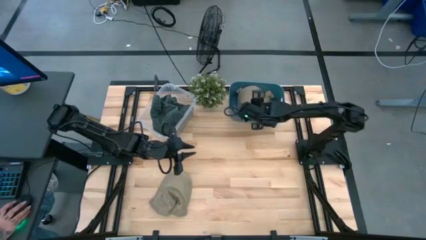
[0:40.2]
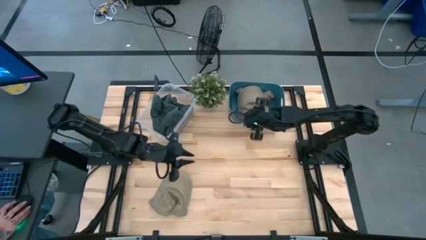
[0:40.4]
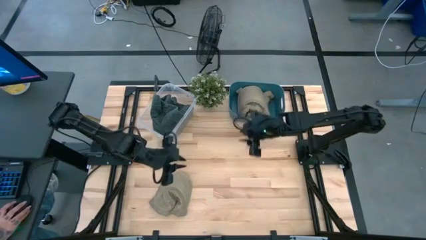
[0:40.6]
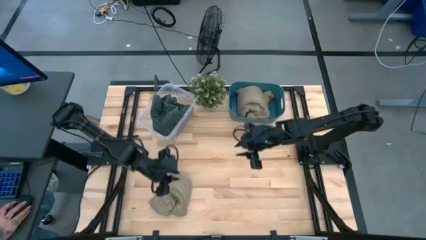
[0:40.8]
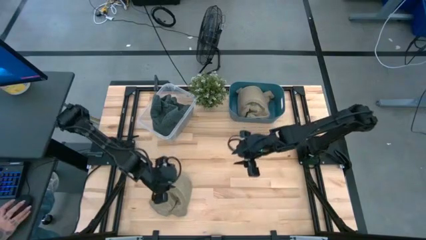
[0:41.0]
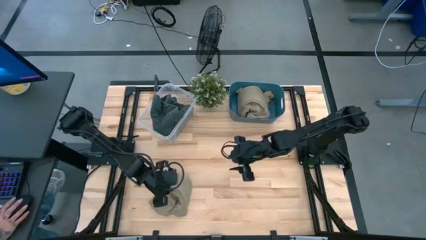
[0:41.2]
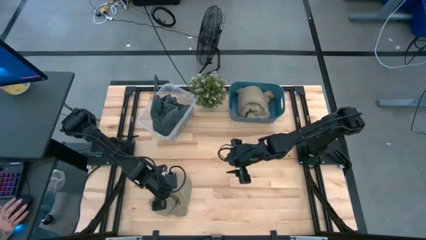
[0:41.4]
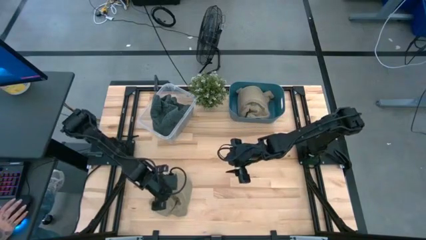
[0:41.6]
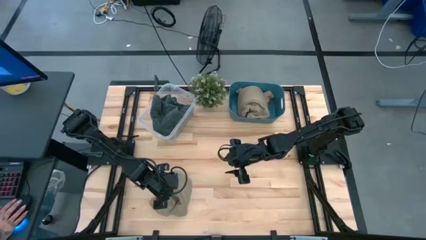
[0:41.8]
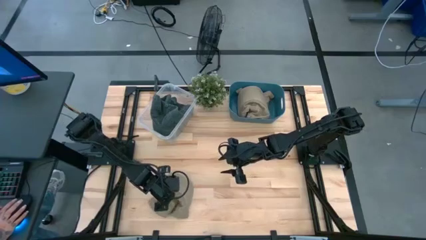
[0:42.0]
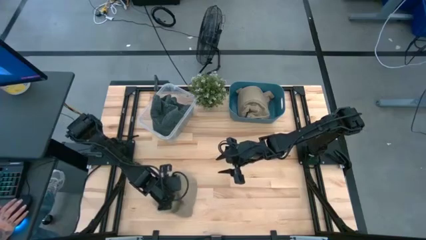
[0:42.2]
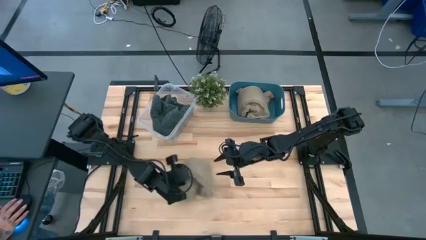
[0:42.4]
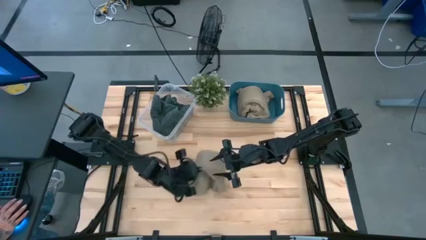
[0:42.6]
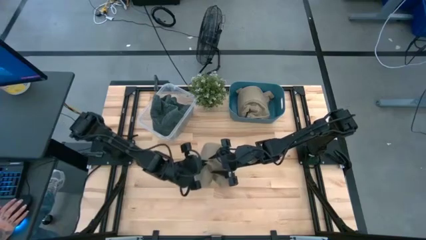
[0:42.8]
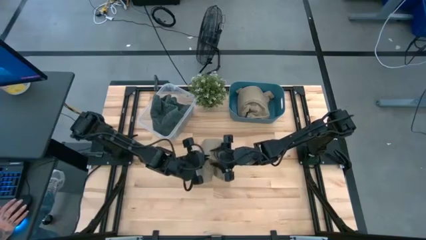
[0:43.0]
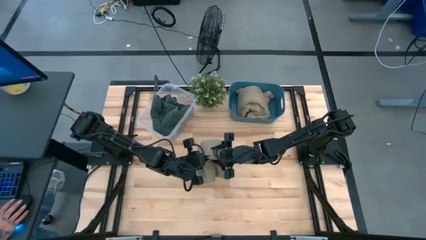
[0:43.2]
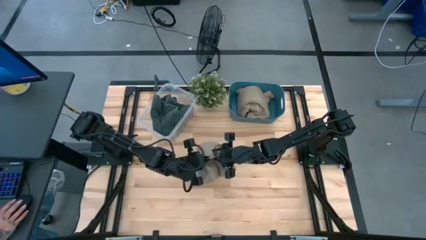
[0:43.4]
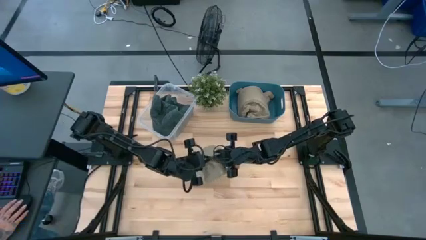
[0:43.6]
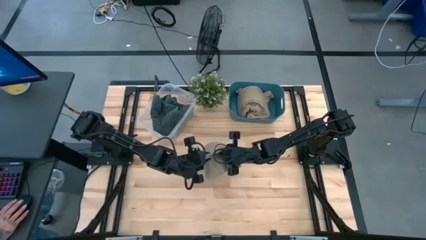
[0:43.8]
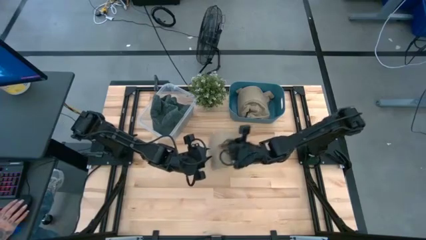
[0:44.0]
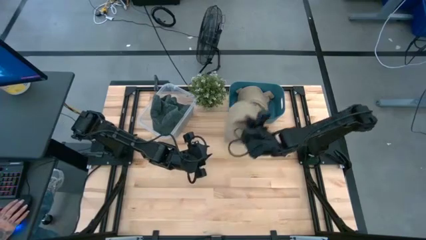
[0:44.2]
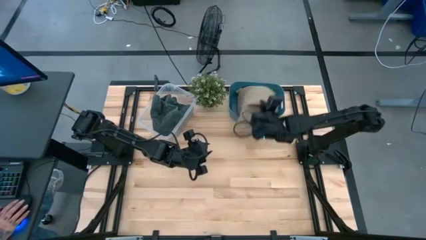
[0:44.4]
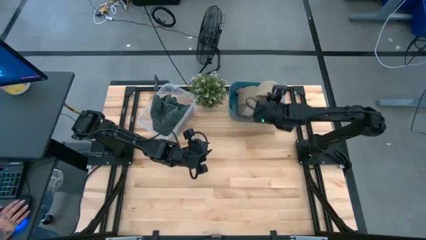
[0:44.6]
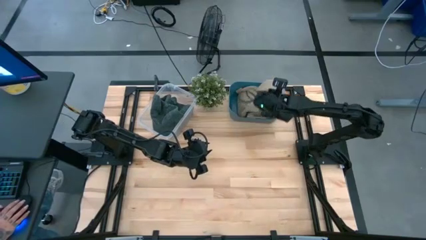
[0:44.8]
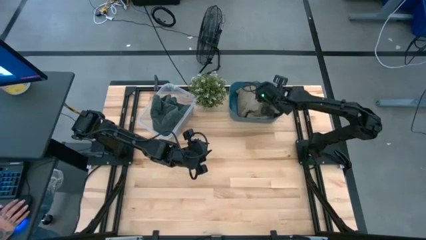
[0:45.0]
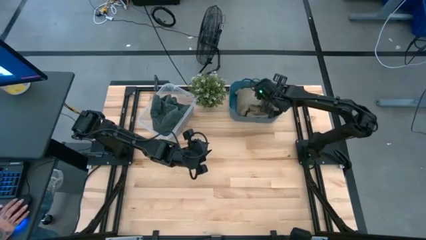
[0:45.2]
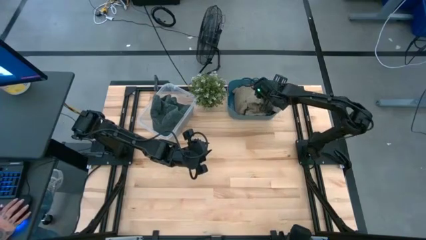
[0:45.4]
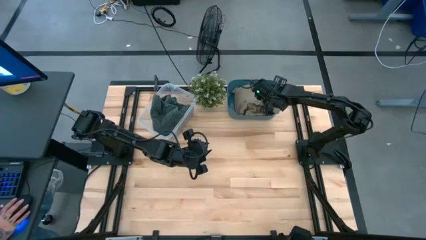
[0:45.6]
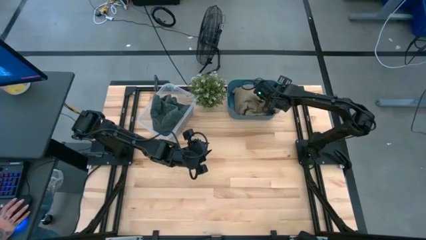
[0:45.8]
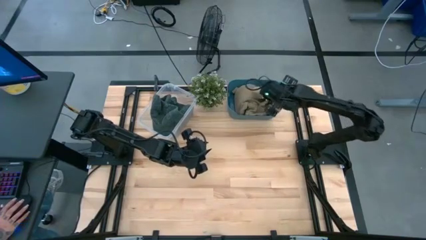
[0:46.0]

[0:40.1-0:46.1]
Task: Pick & Place hat
Put the brown cap into the blue bin

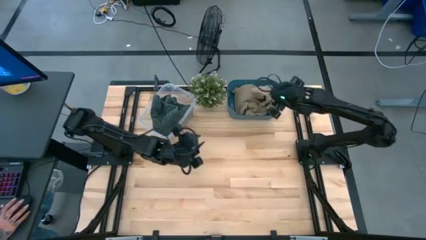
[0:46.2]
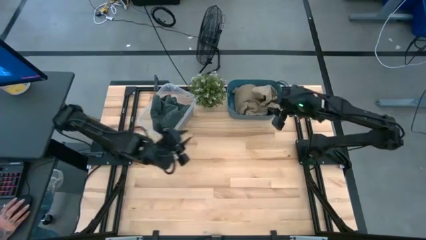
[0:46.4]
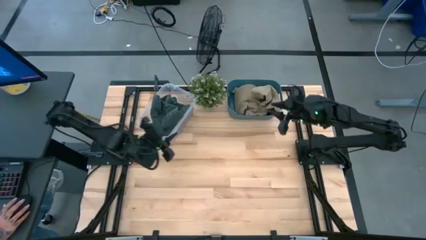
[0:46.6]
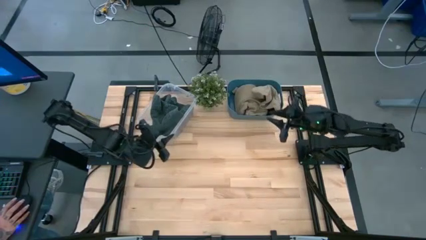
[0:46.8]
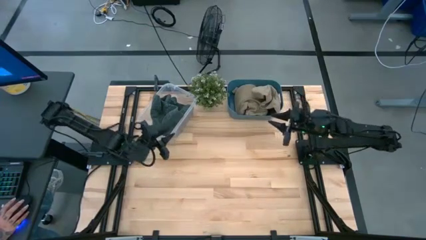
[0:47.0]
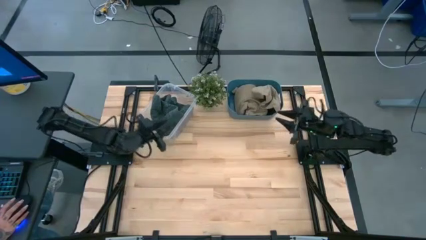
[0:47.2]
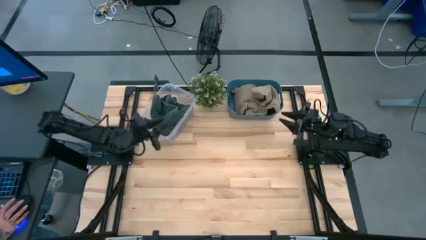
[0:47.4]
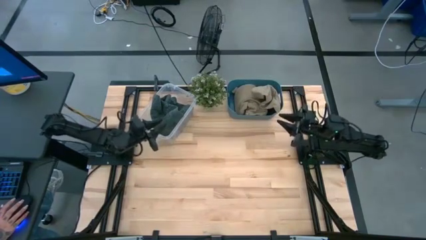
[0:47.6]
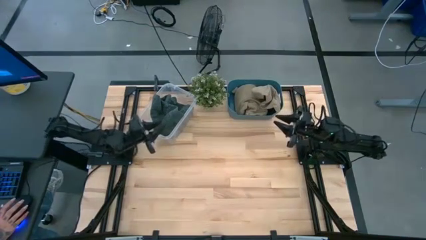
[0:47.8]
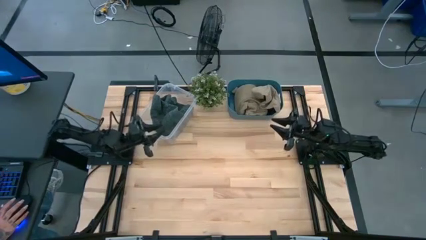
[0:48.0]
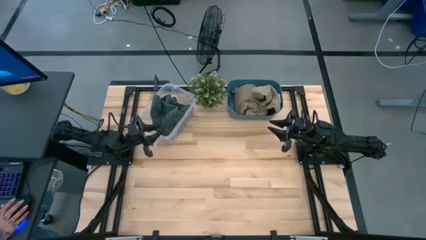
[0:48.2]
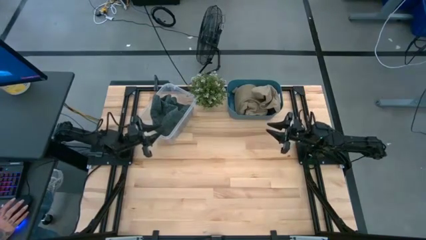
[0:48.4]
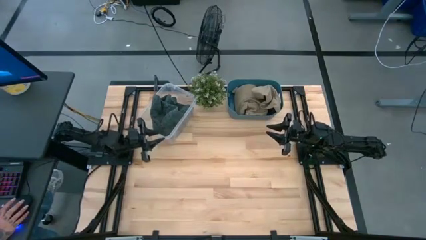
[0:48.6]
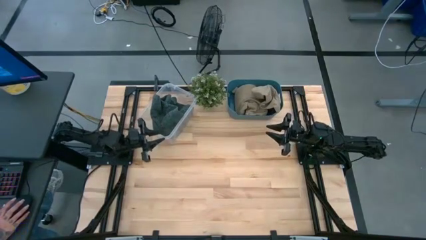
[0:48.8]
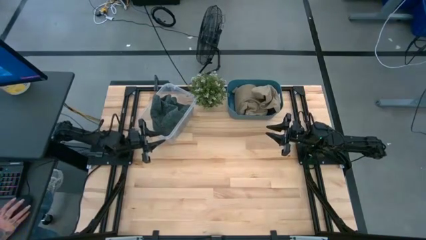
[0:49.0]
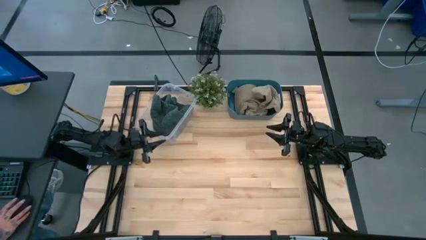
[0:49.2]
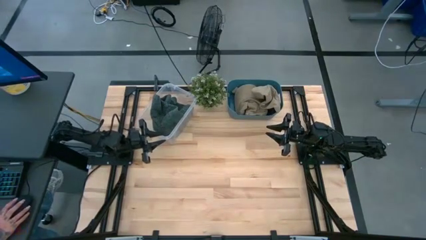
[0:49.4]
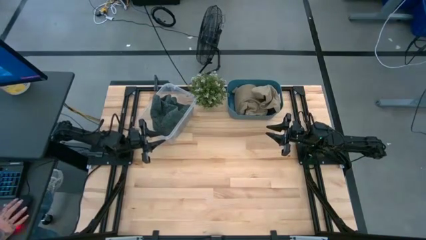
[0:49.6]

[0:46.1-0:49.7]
Return to Home Position

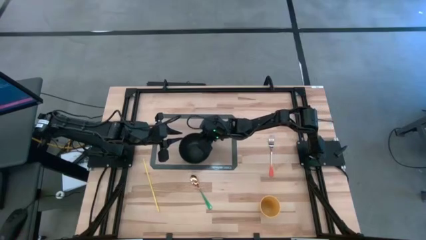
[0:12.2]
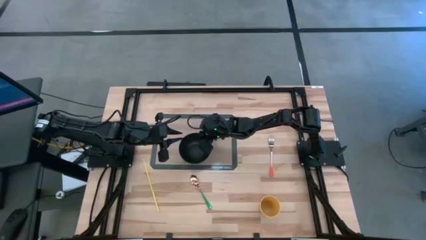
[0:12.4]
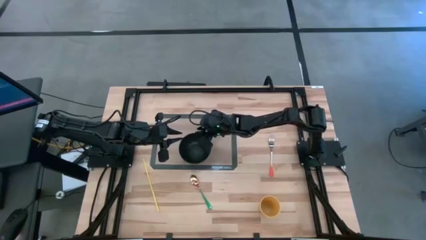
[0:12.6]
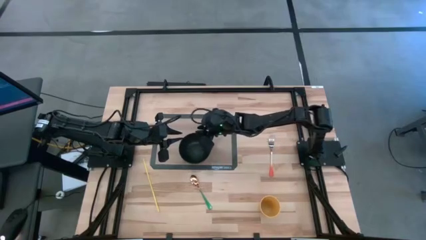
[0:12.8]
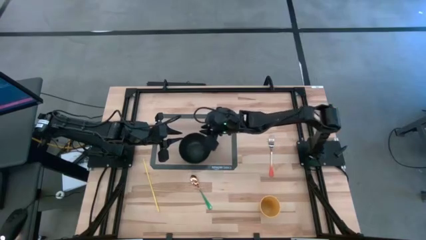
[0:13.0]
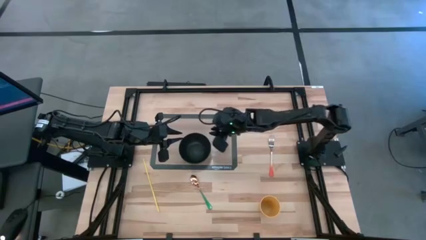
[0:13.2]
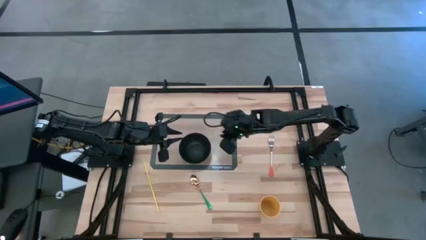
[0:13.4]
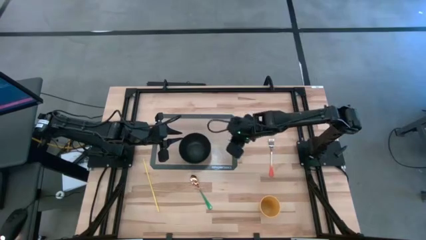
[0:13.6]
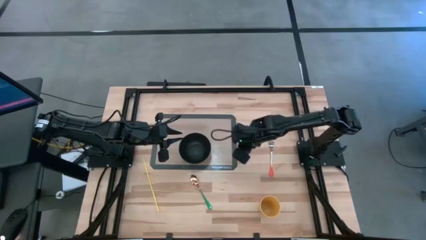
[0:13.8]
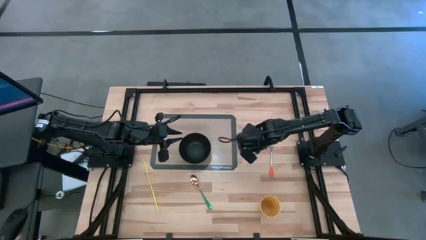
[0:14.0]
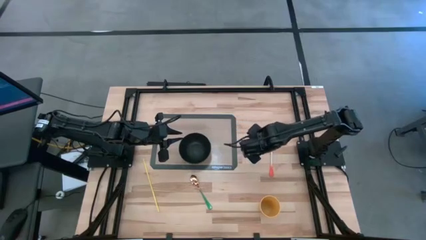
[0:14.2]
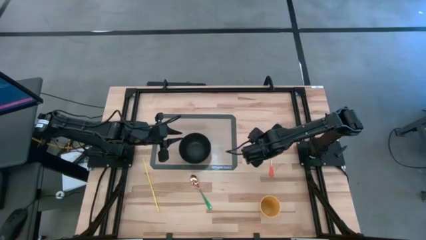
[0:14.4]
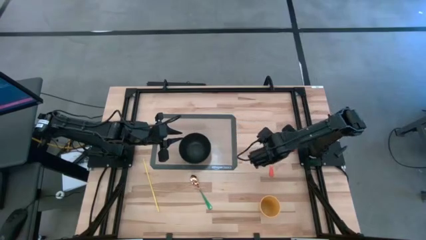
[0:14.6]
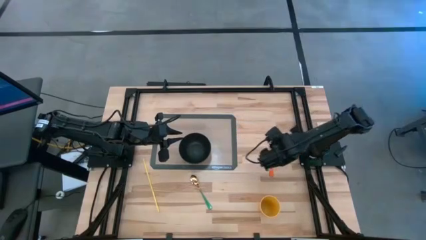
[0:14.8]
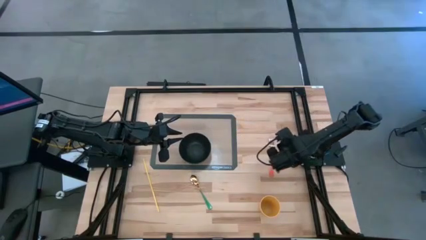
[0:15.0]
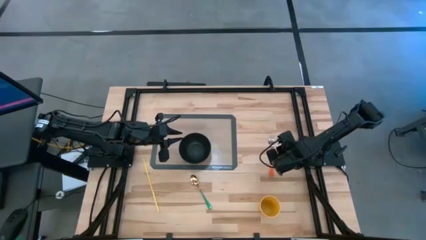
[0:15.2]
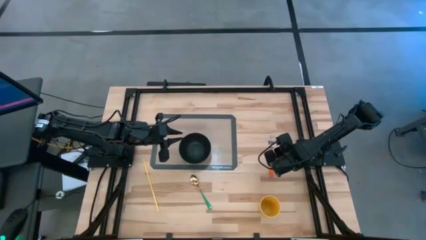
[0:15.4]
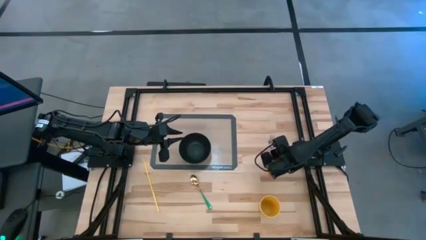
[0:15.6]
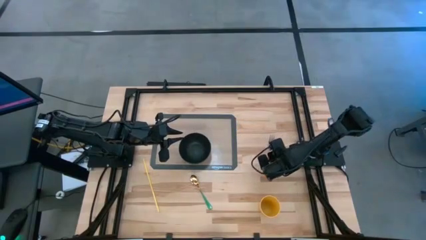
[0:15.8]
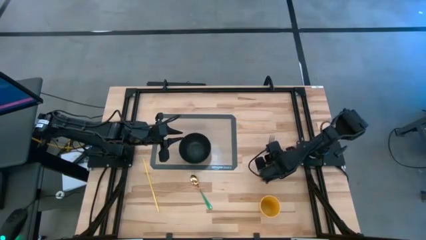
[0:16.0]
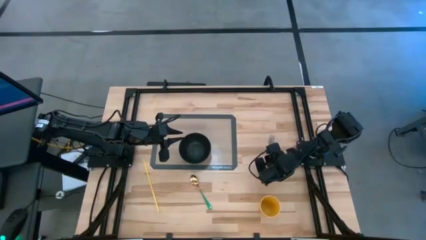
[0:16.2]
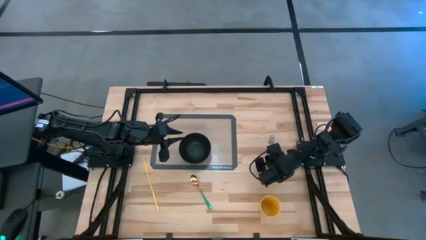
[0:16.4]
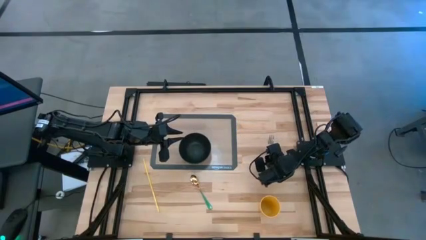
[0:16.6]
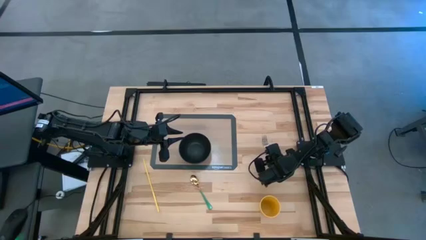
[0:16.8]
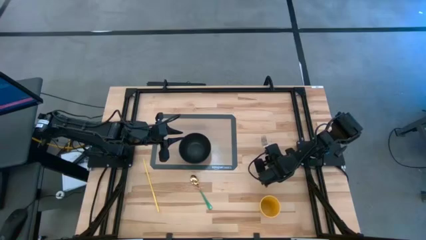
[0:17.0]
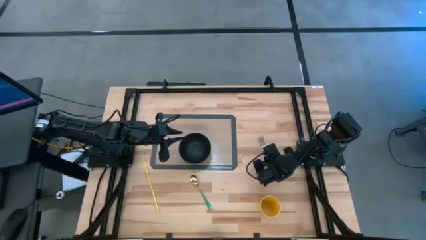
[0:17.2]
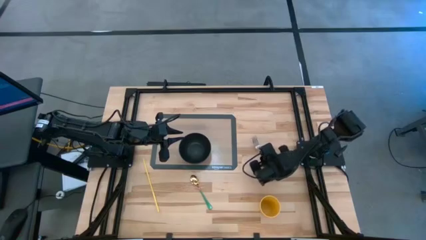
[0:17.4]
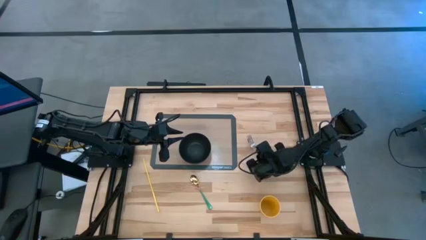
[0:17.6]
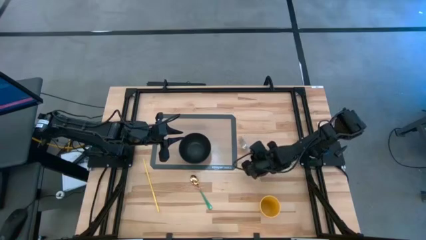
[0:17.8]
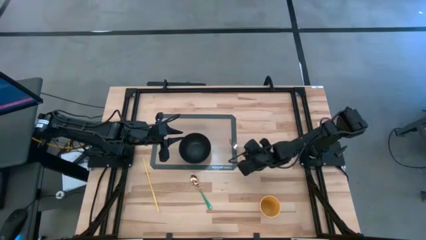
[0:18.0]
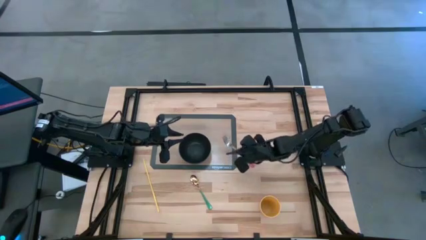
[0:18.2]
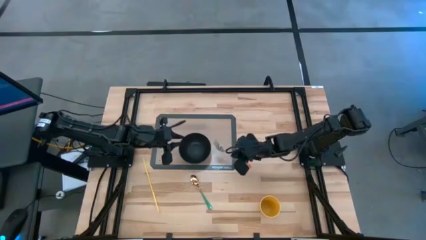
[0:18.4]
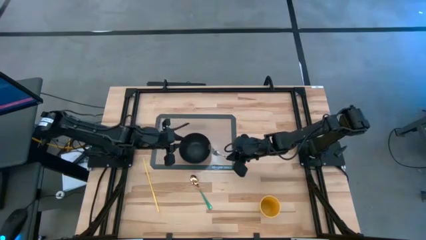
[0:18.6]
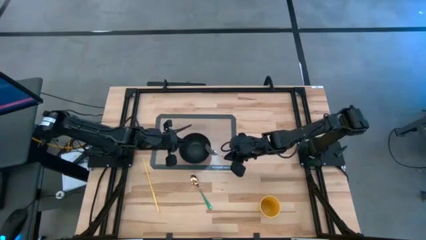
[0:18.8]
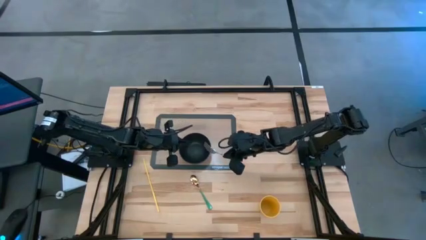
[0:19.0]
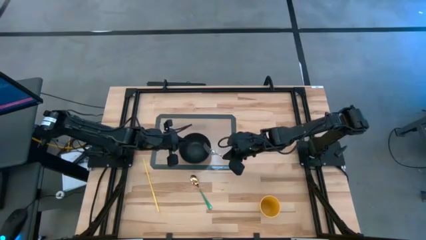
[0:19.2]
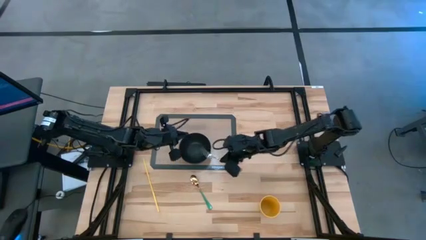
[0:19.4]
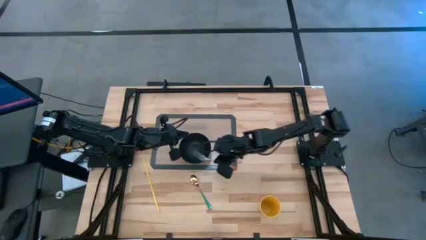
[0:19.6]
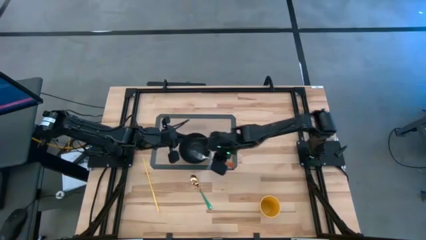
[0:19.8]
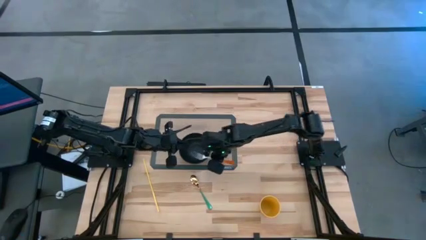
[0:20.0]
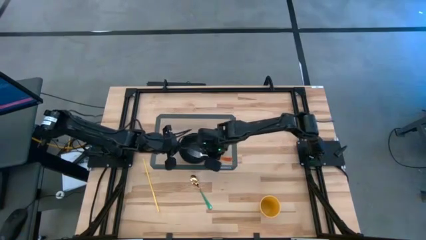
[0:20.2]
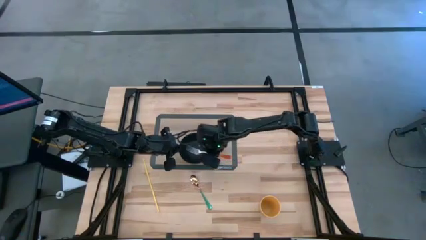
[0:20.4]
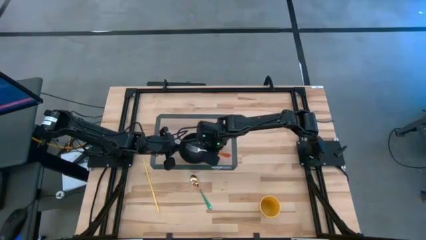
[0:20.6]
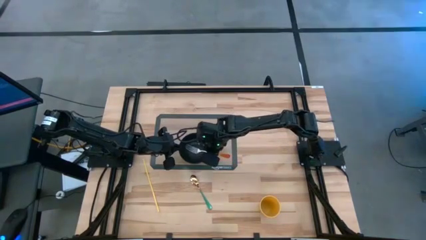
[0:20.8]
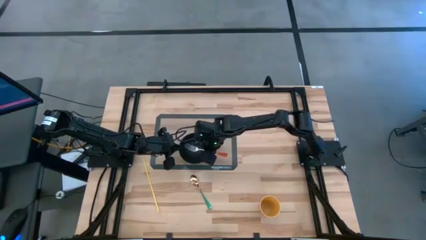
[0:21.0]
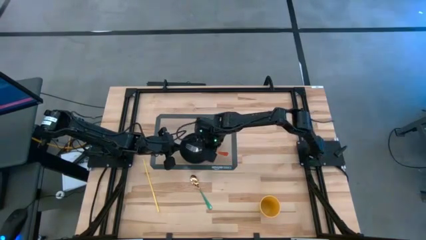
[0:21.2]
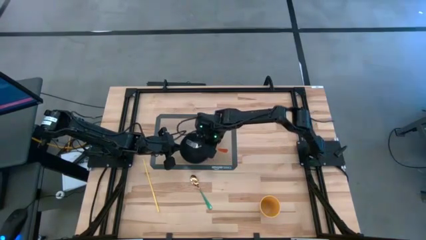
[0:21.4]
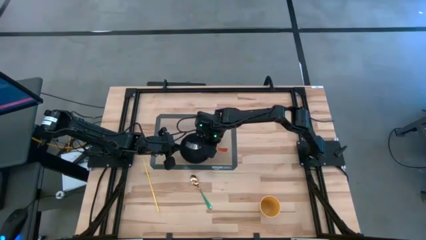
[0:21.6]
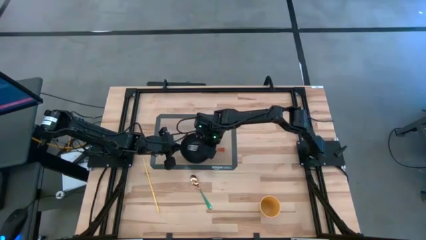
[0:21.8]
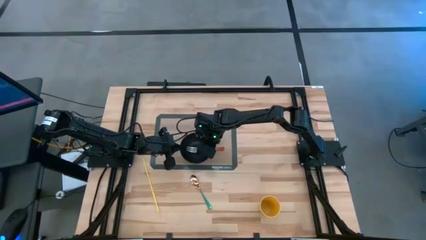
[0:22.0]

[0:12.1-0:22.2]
Task: Pick & Place Utensil
Put the orange fork into the black bowl on the transparent mat
